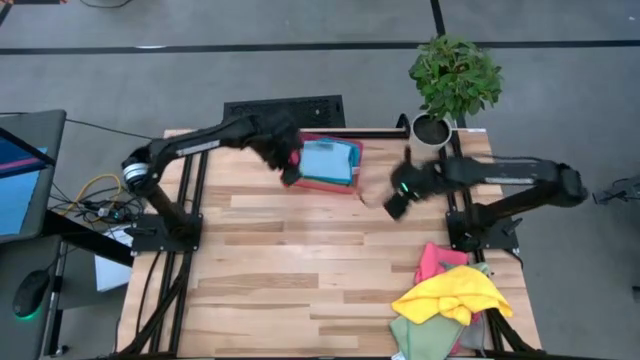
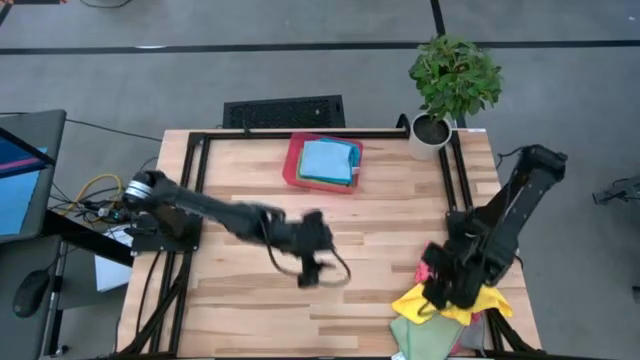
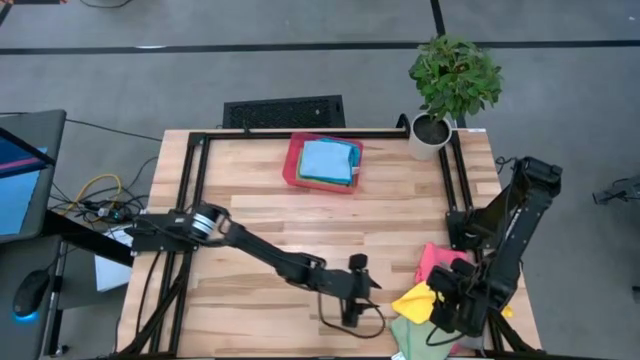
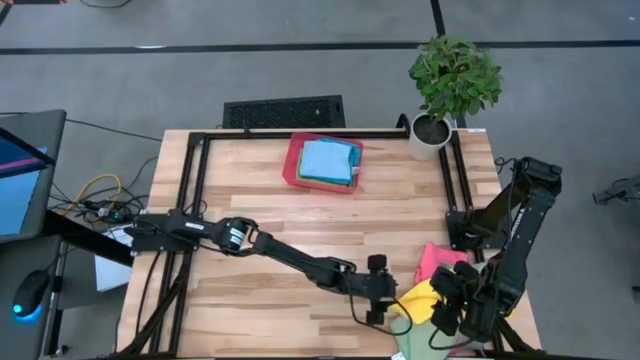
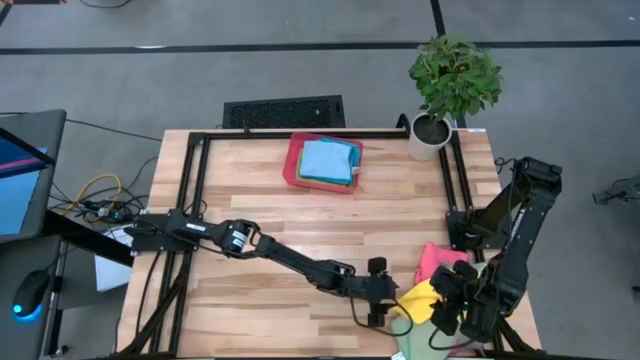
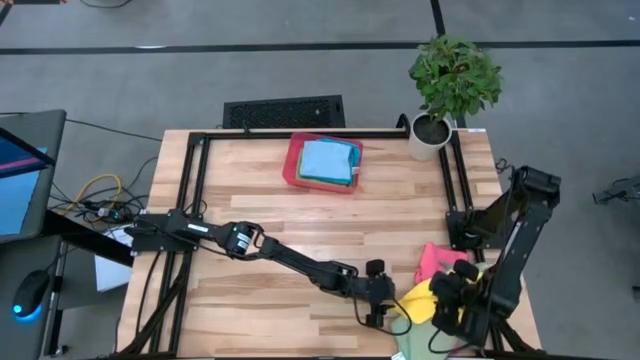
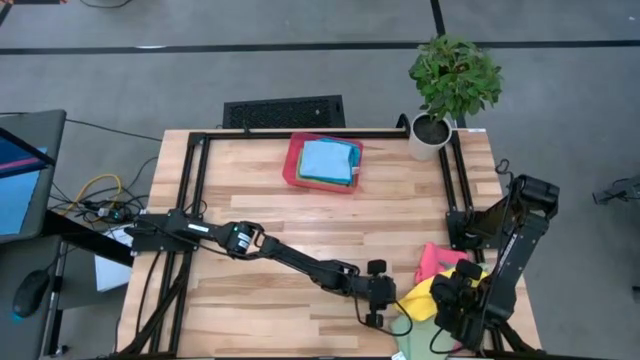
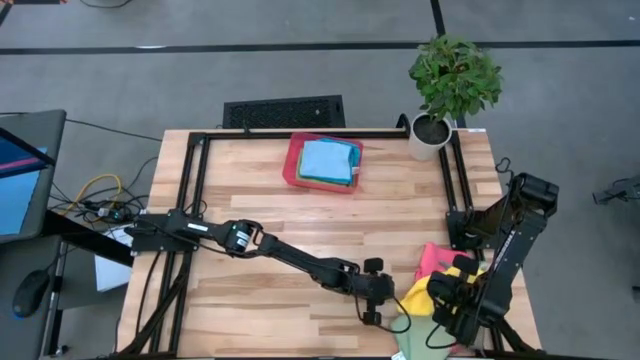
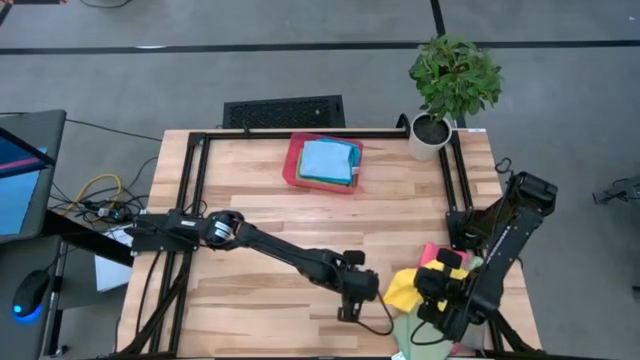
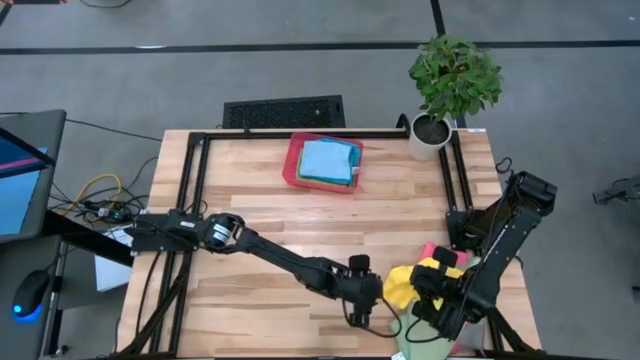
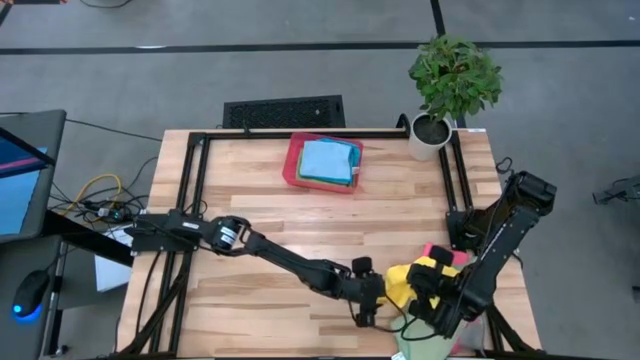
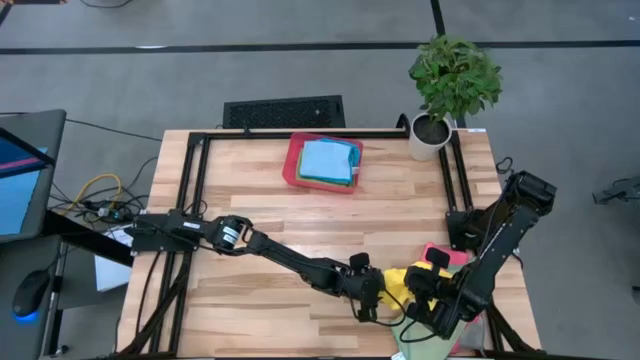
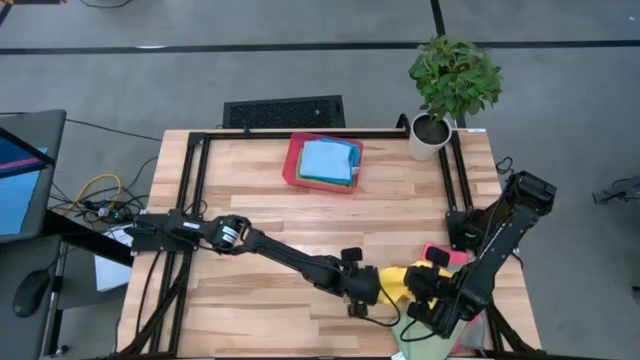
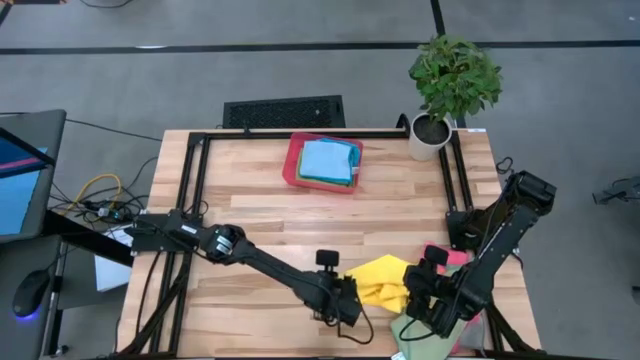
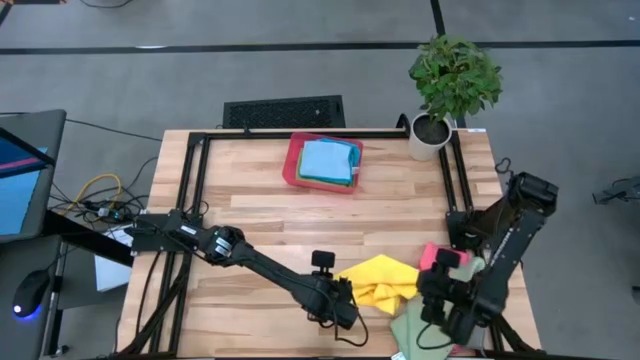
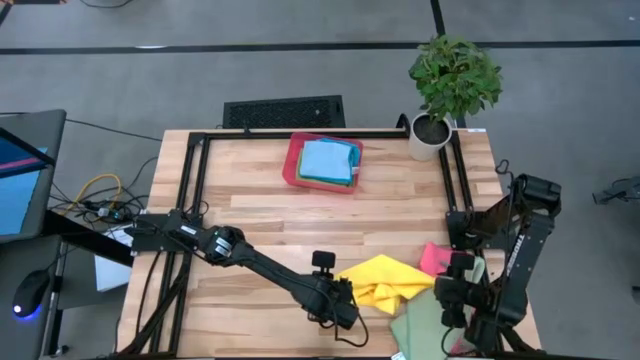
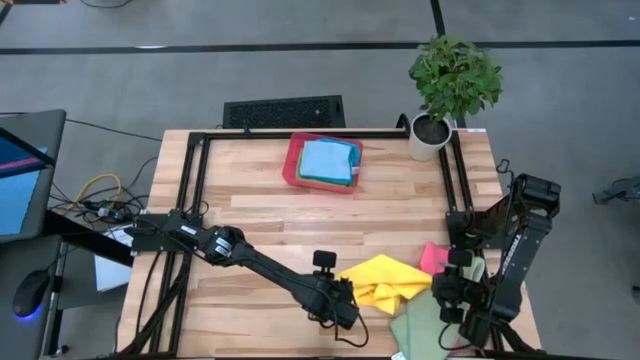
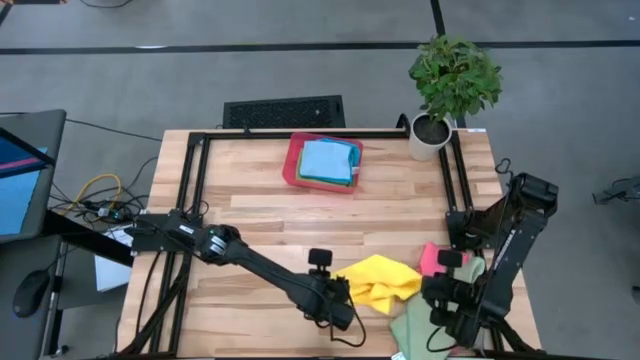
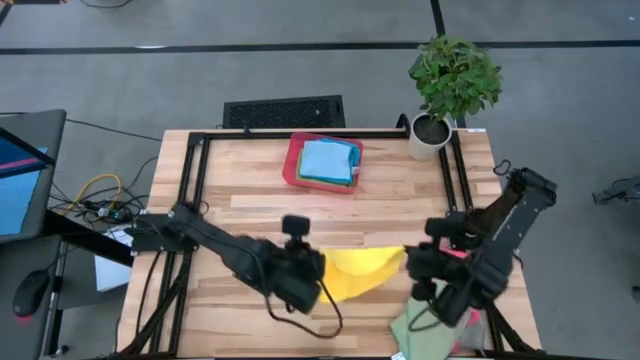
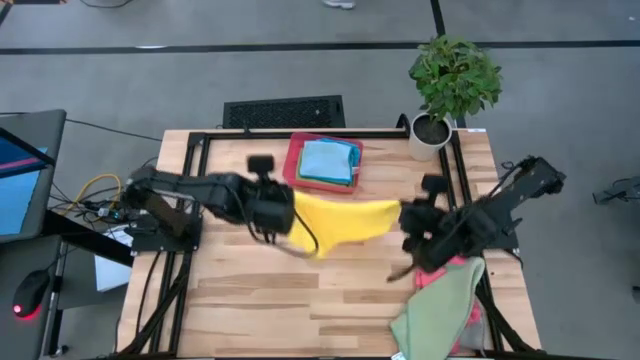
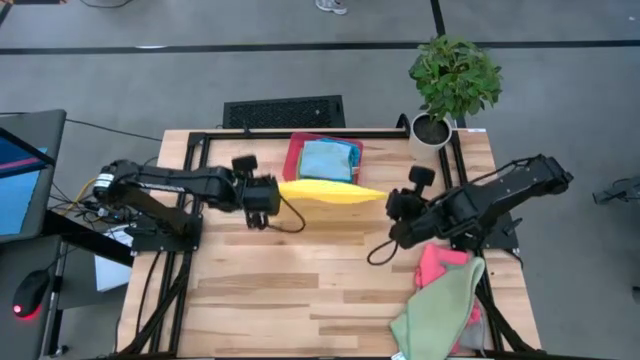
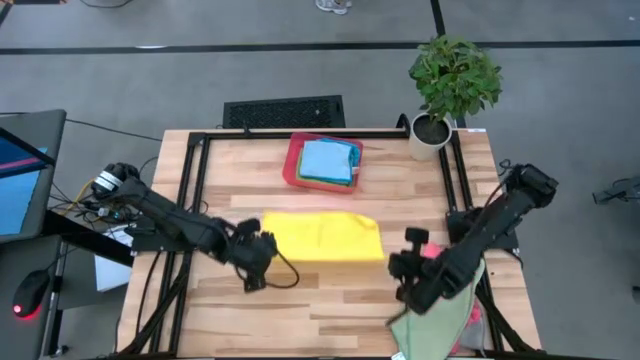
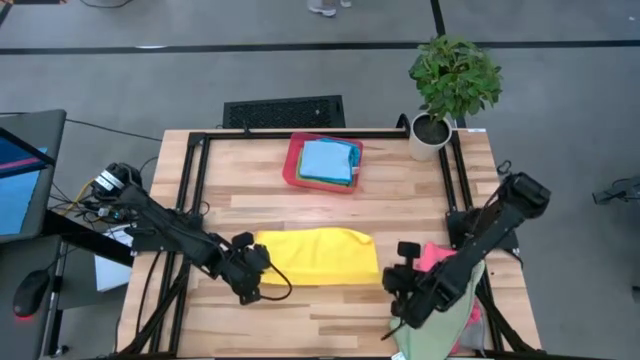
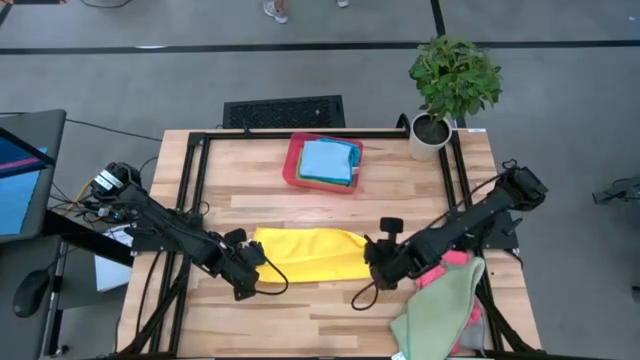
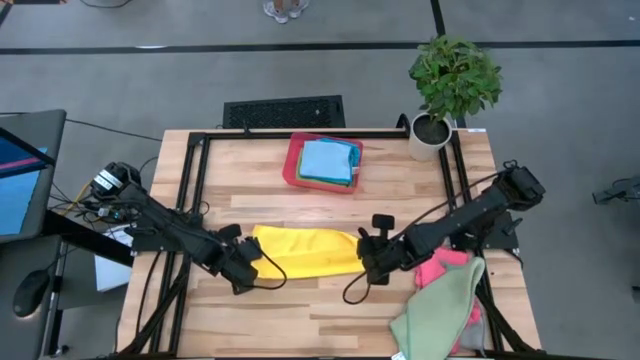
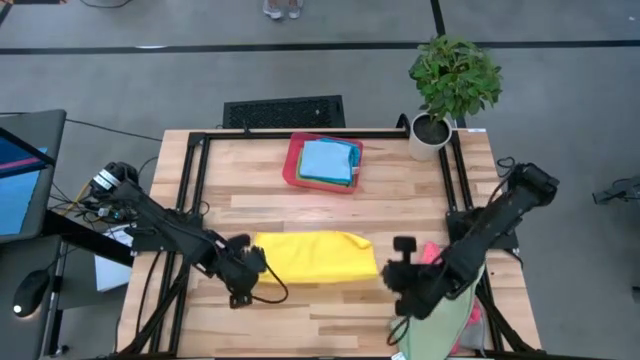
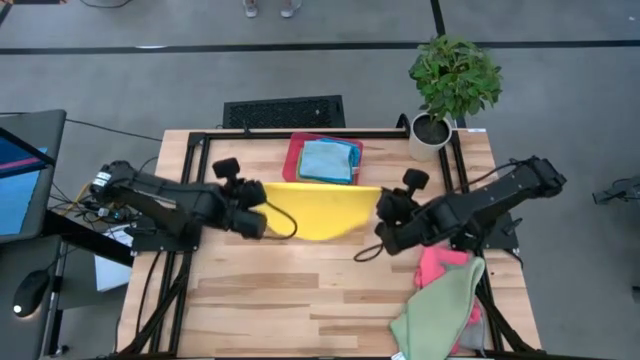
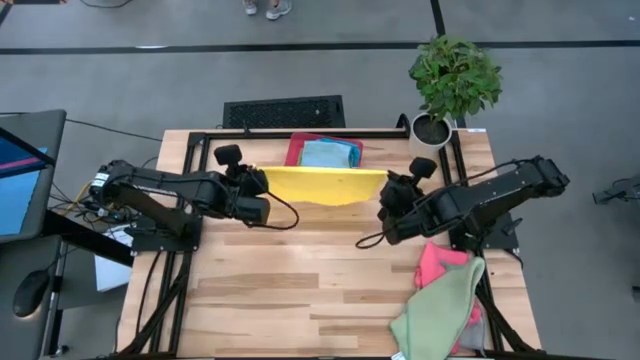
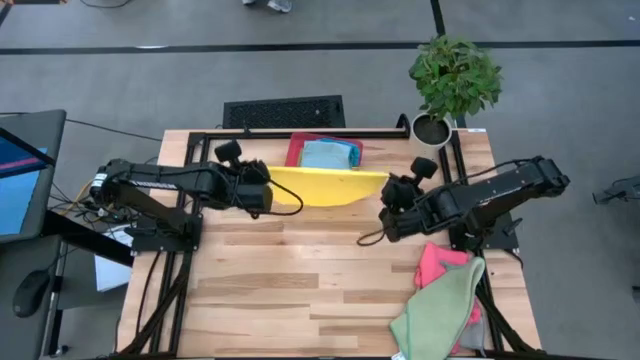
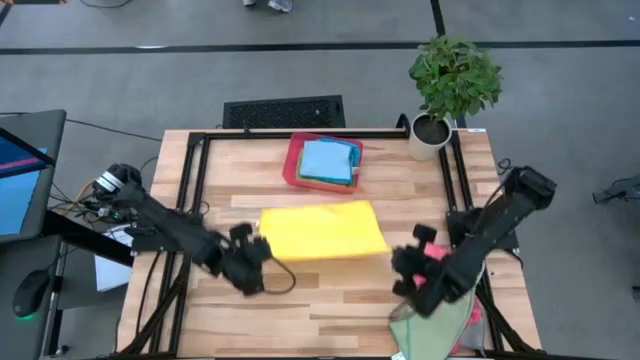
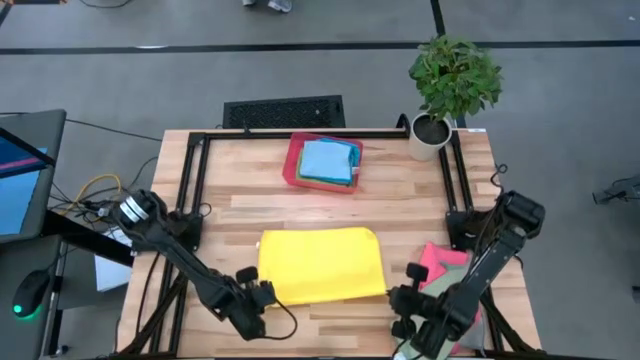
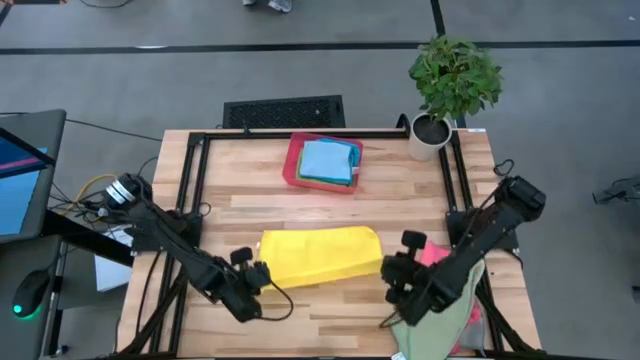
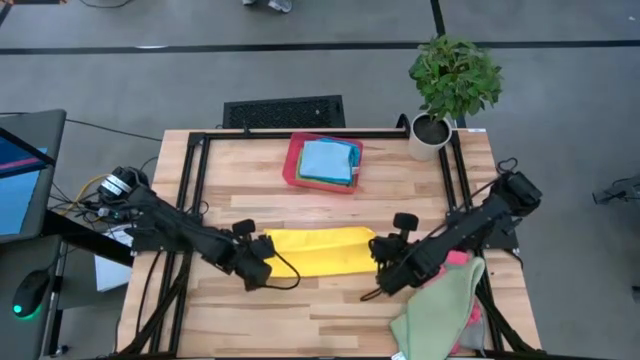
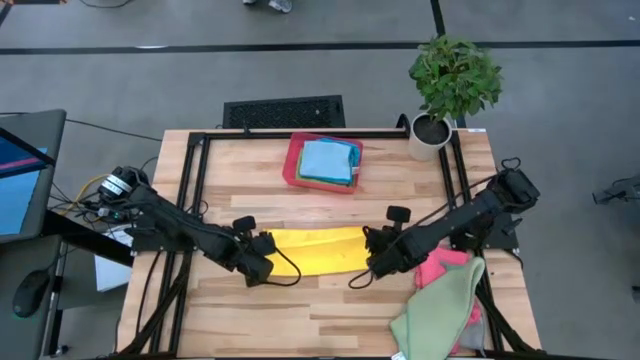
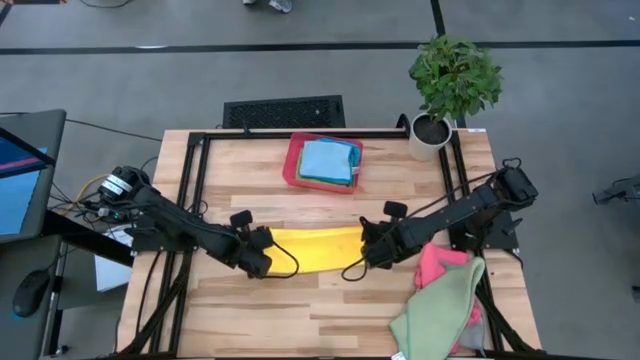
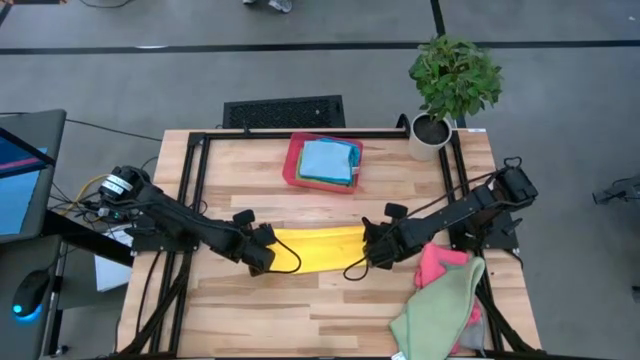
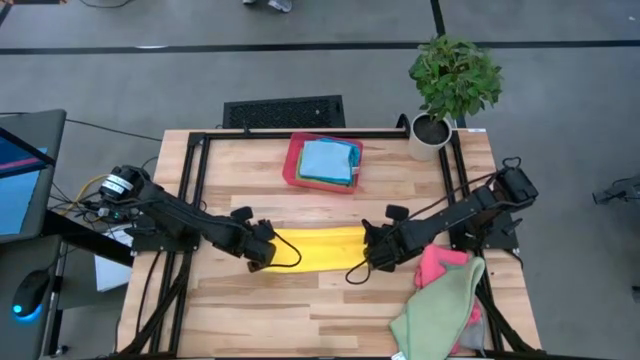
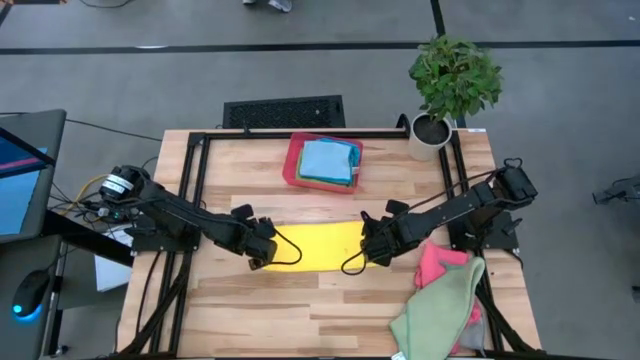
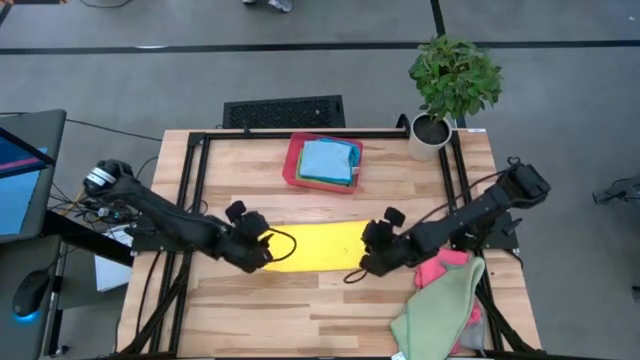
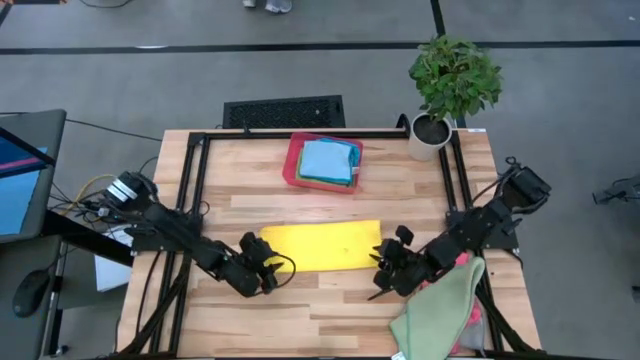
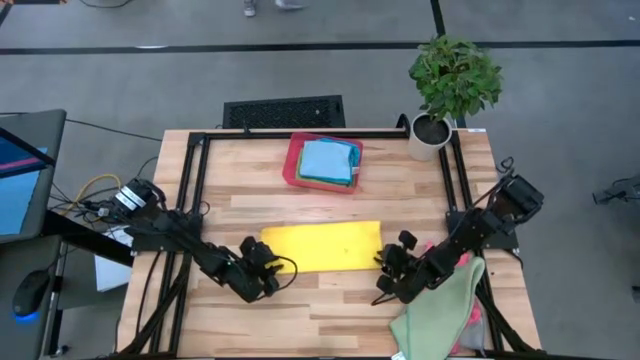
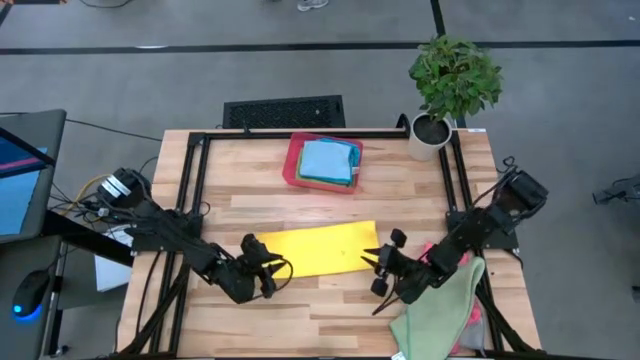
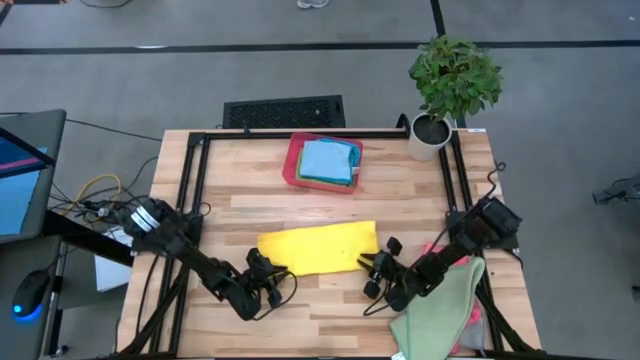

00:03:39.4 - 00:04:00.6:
Task: Fold microfiber towels
Fold the yellow microfiber cloth
